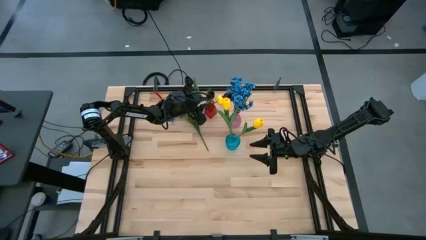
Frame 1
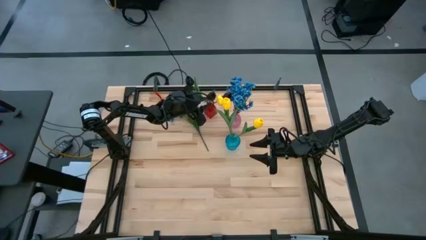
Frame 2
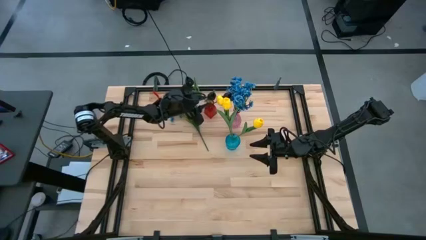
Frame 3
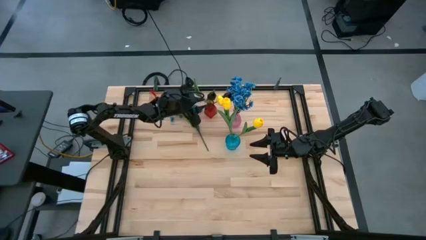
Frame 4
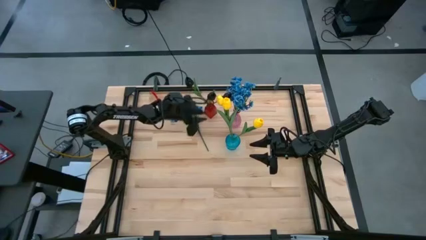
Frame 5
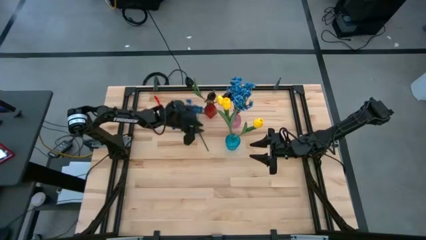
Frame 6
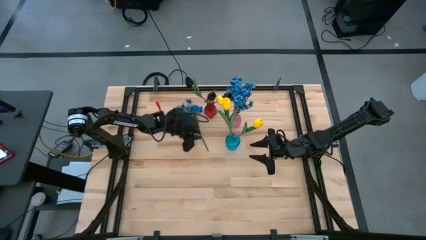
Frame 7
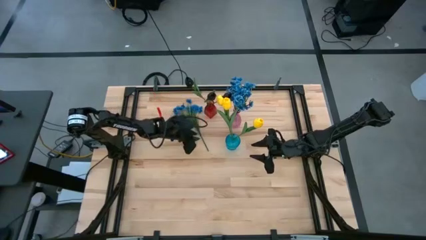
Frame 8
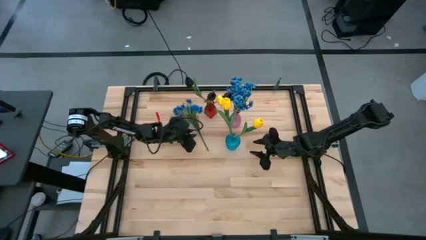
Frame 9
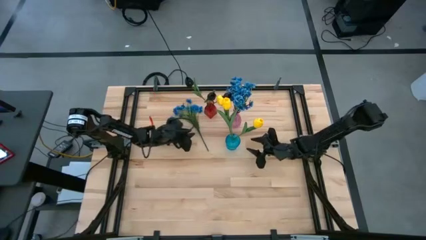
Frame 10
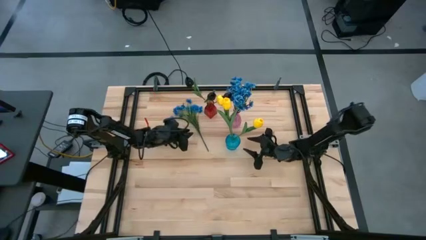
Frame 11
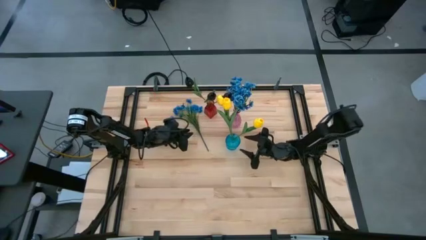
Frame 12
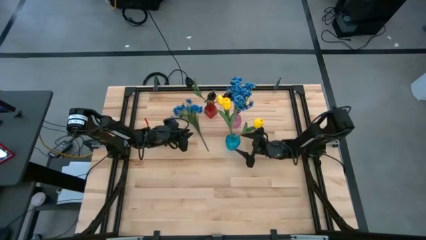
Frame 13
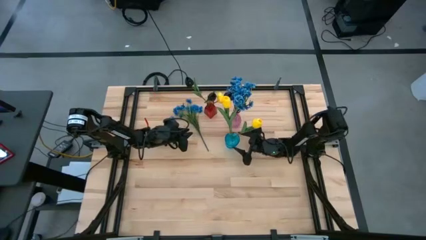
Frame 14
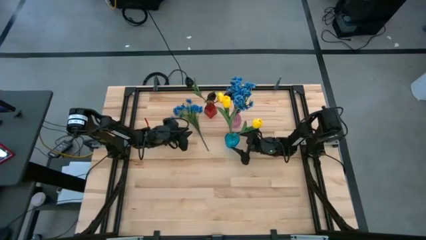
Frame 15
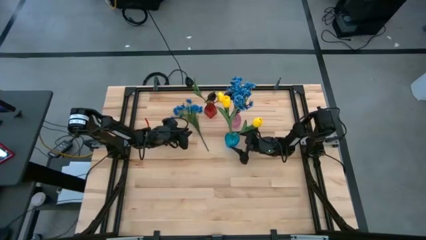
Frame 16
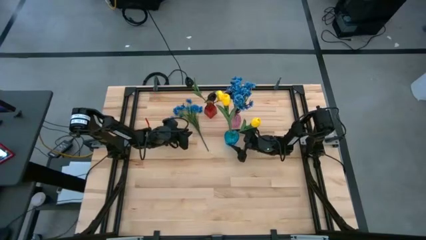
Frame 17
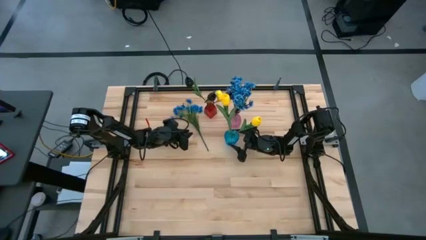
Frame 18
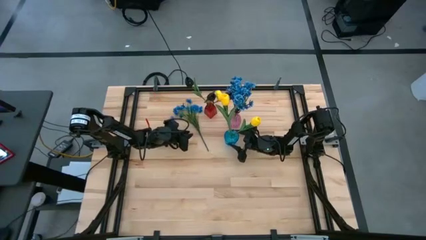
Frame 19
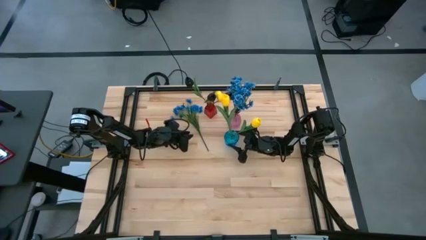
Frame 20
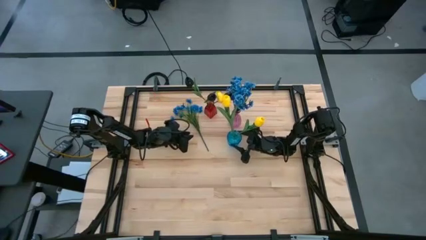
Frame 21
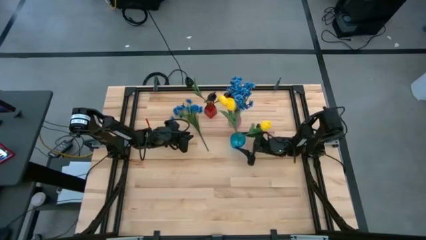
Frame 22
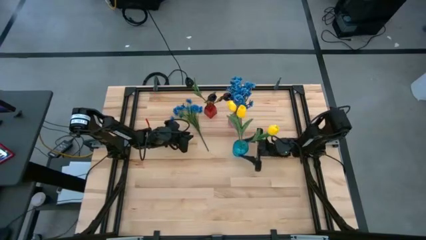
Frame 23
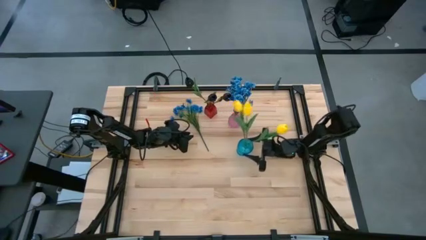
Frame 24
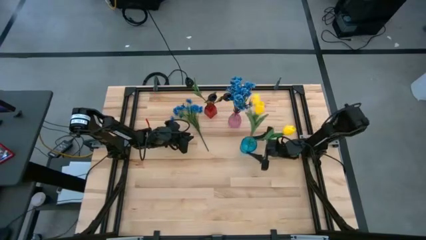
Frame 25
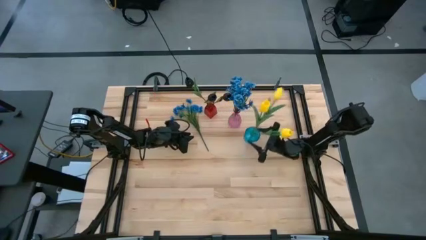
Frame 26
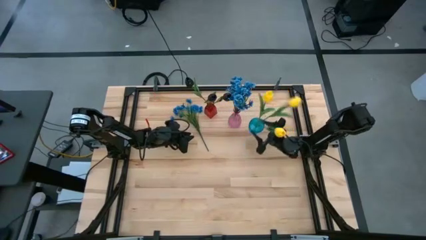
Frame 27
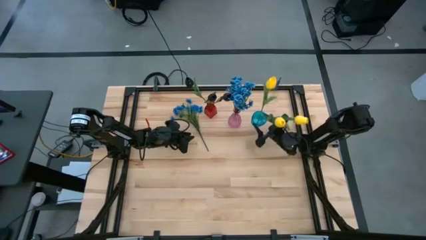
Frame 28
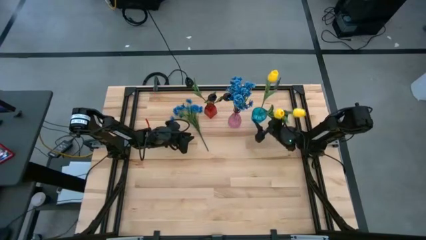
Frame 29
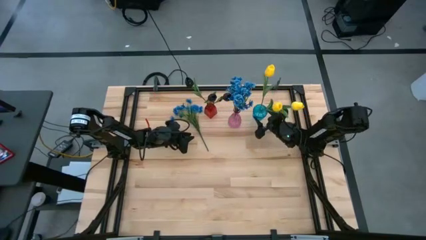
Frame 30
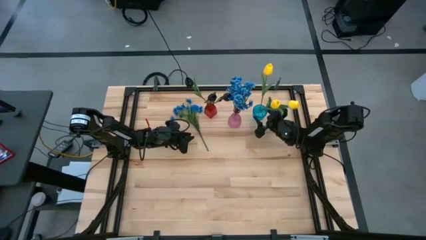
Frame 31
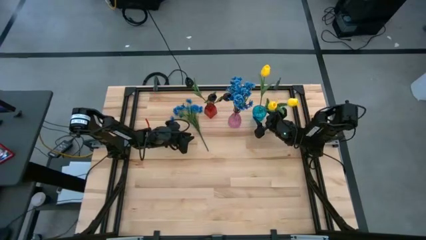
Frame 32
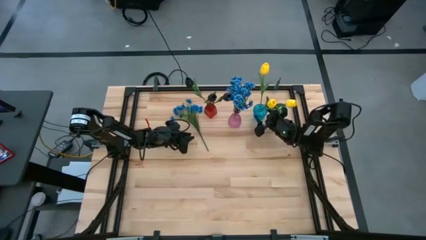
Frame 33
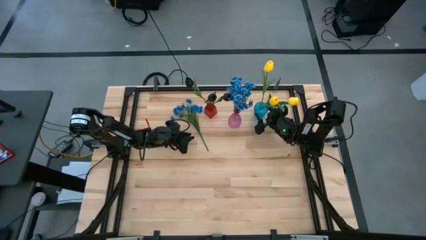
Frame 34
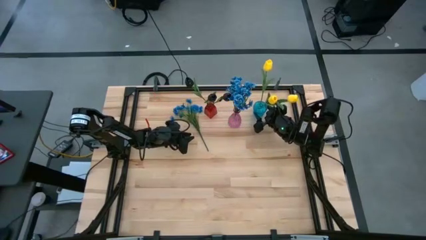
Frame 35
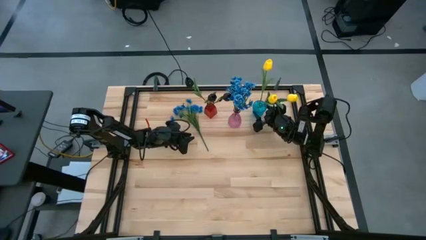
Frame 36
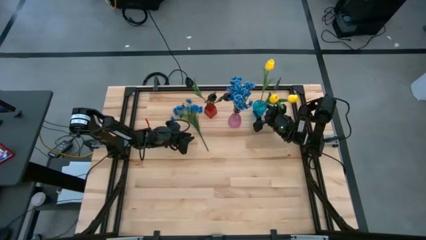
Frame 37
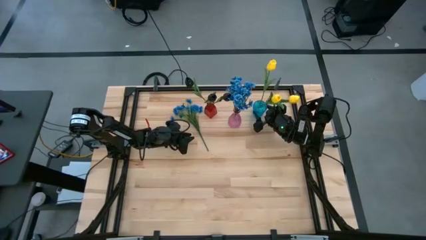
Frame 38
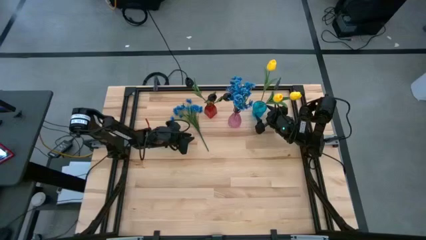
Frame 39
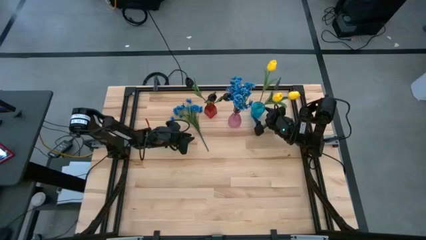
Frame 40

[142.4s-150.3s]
Task: Sort flowers into vase by color
Move the blue vase to the top right of the table

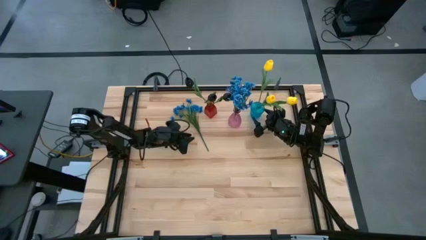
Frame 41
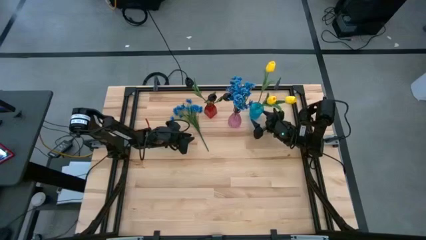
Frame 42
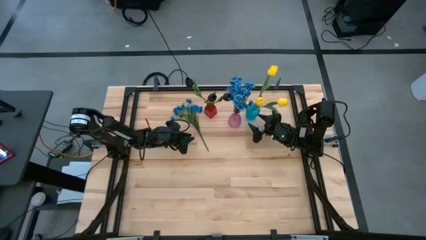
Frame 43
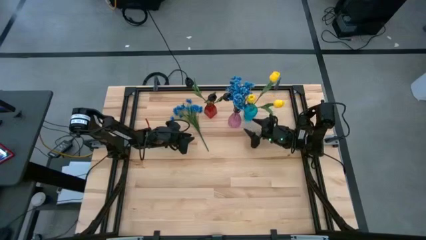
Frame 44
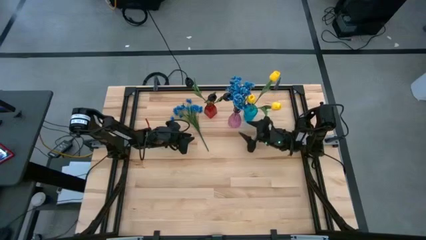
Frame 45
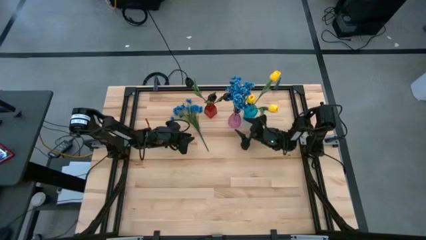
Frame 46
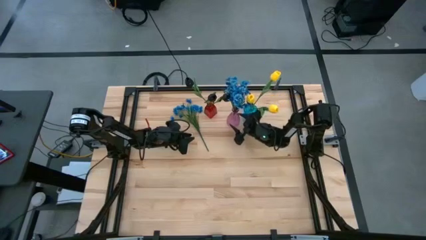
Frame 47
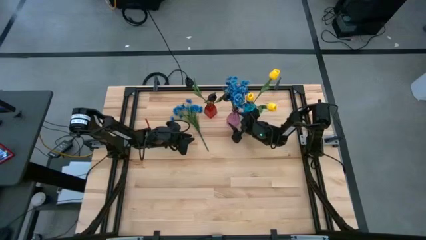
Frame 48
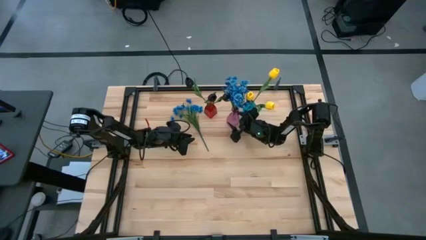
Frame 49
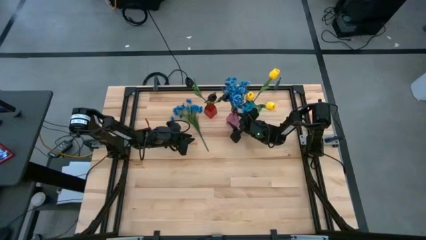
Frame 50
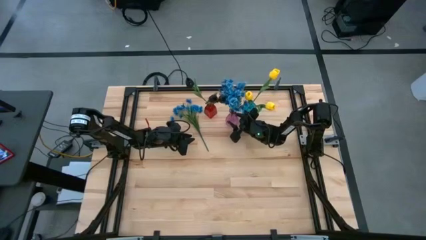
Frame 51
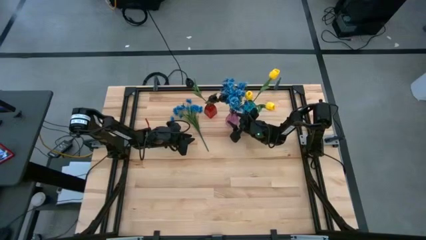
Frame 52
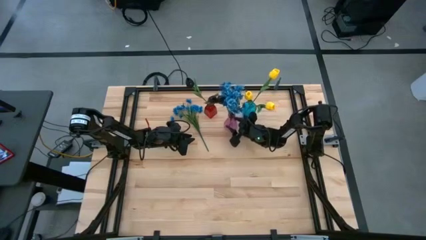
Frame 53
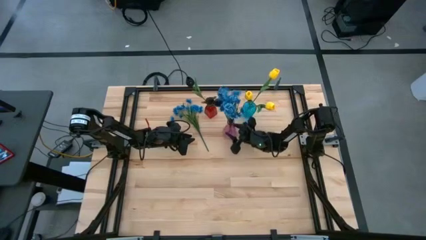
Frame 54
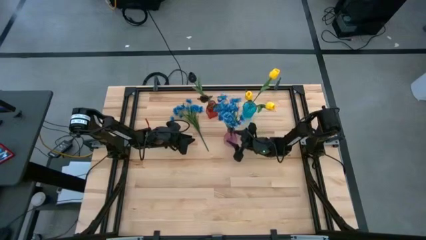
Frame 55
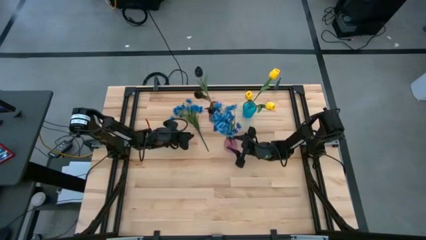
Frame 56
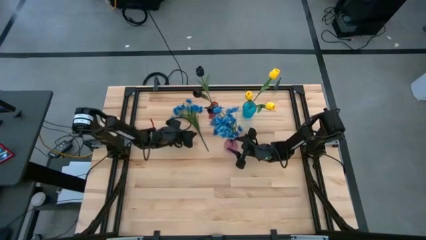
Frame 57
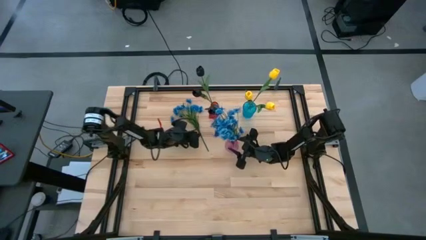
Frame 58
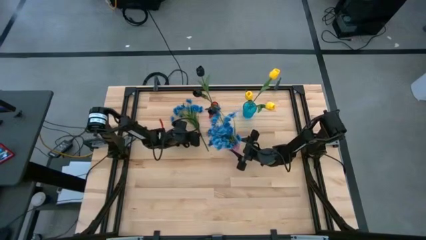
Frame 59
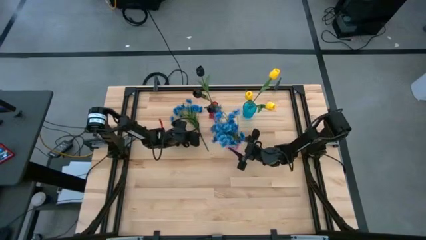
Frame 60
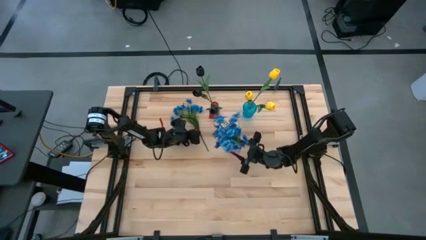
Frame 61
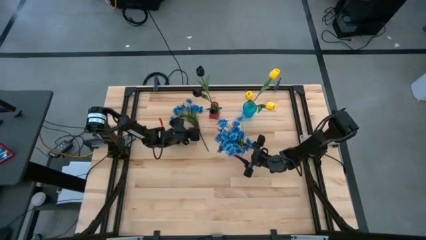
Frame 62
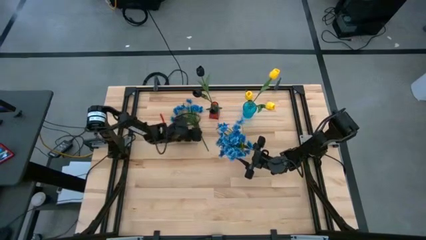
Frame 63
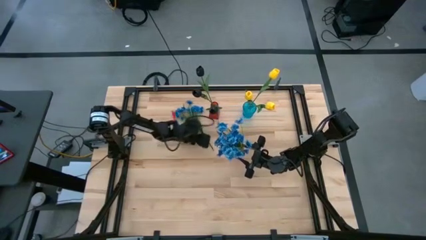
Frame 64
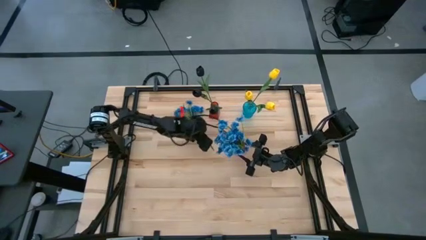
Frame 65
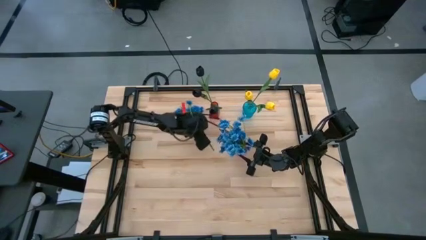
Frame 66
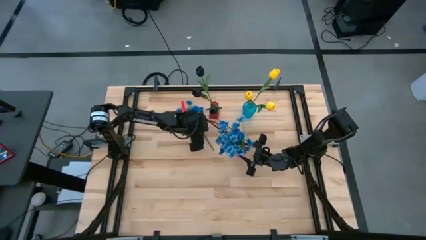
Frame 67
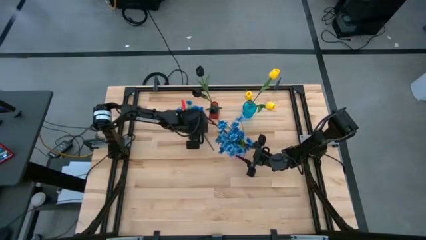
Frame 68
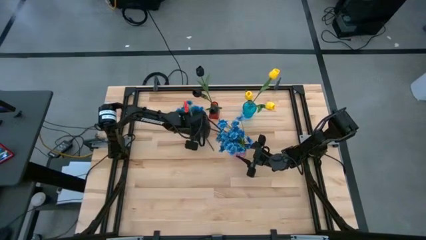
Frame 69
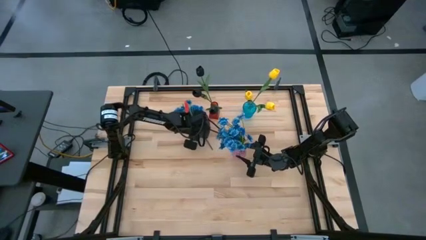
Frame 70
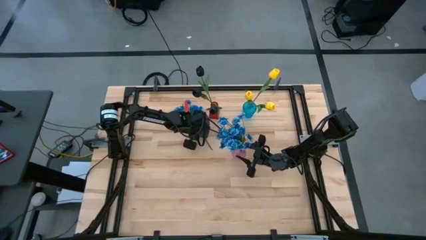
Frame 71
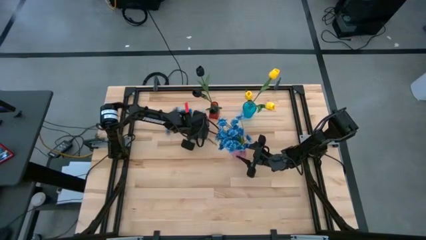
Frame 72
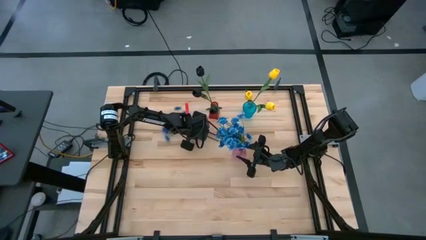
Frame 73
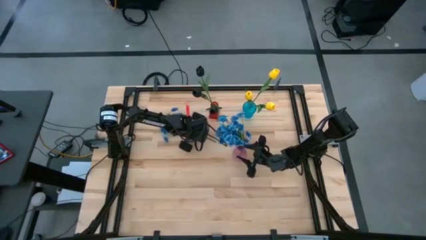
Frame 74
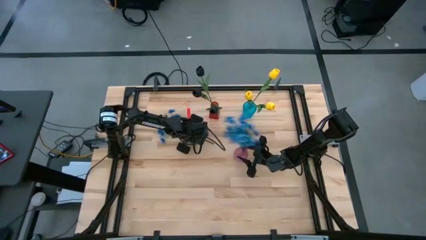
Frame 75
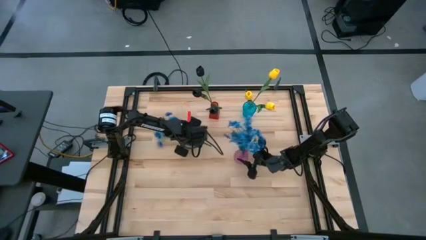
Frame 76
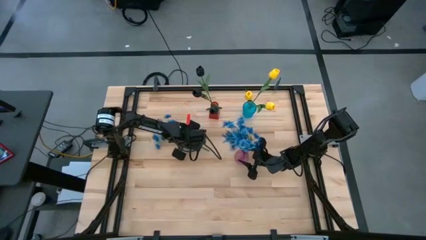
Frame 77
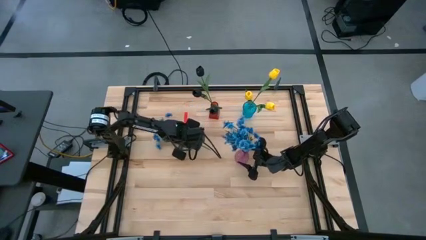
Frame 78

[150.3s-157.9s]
Move the pink vase to the center of the table
